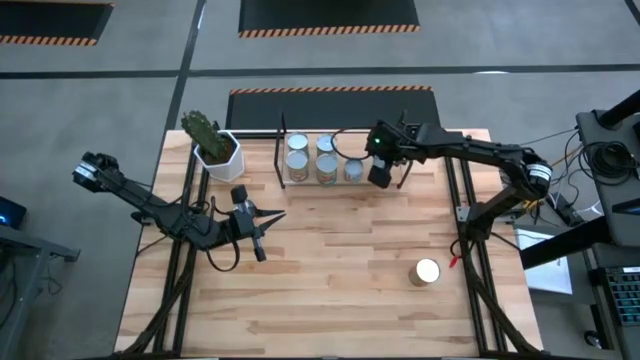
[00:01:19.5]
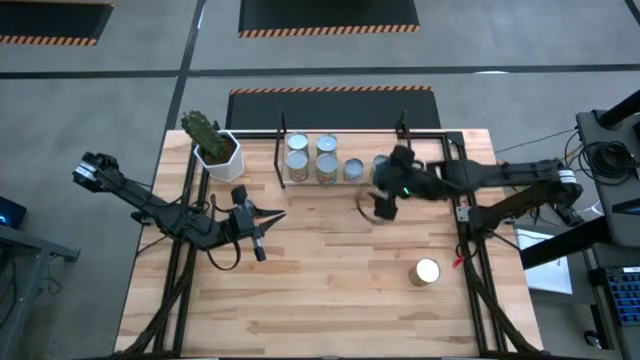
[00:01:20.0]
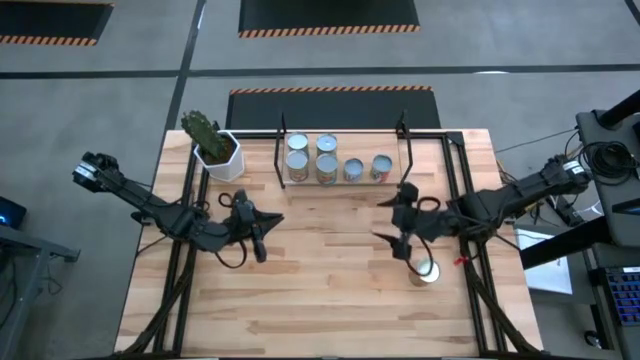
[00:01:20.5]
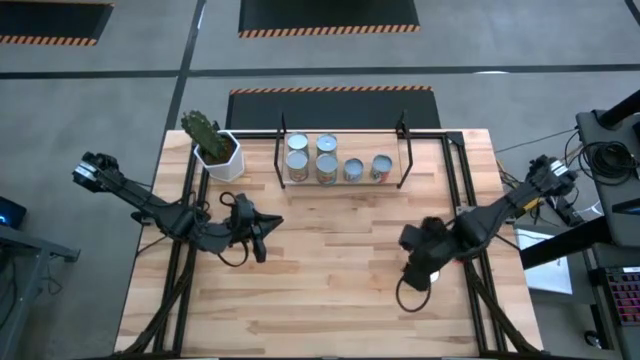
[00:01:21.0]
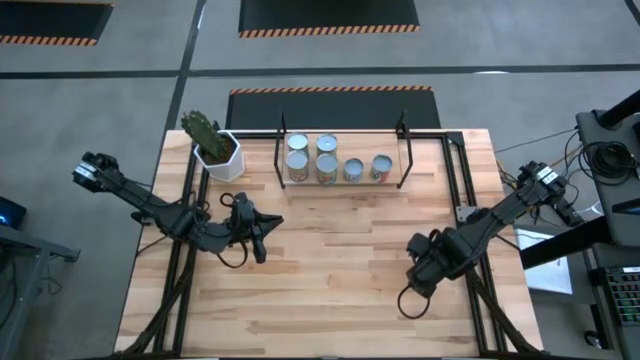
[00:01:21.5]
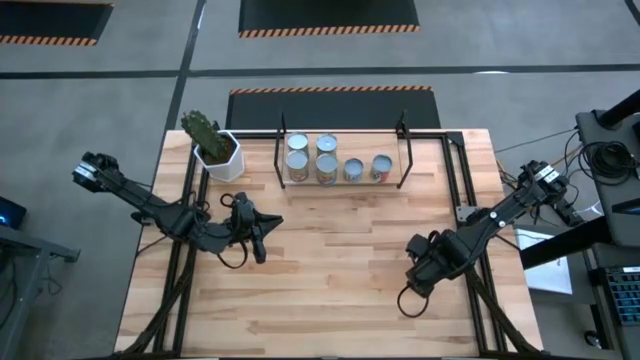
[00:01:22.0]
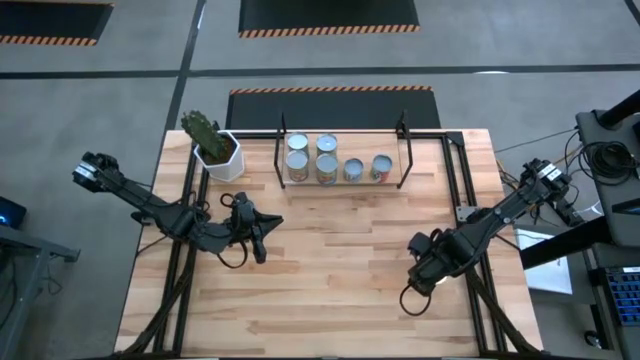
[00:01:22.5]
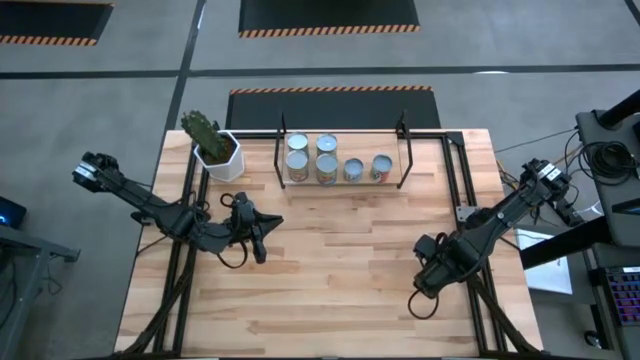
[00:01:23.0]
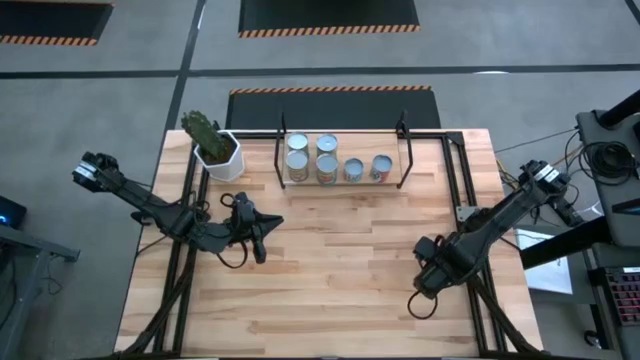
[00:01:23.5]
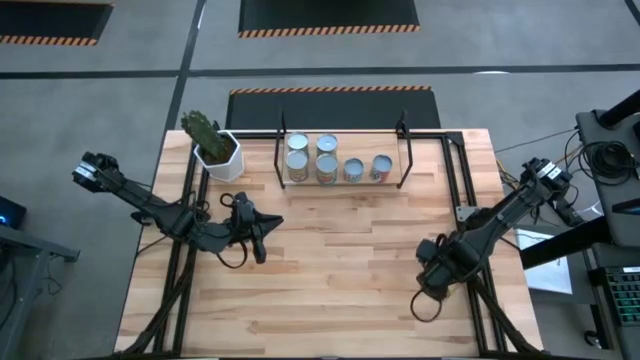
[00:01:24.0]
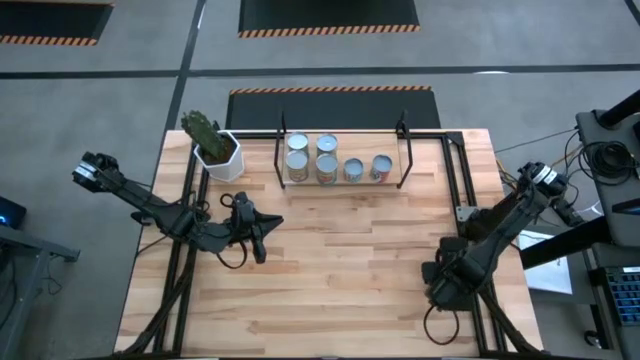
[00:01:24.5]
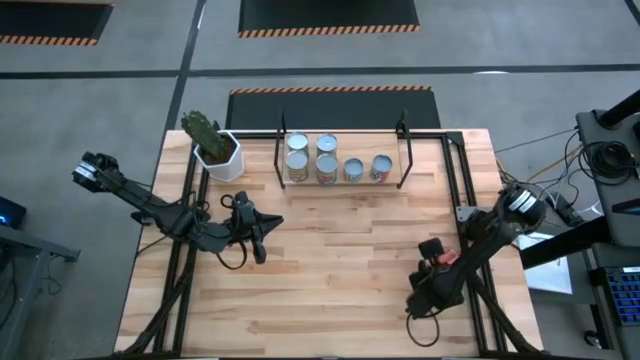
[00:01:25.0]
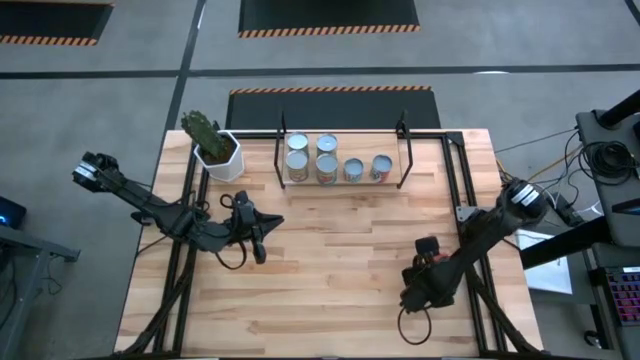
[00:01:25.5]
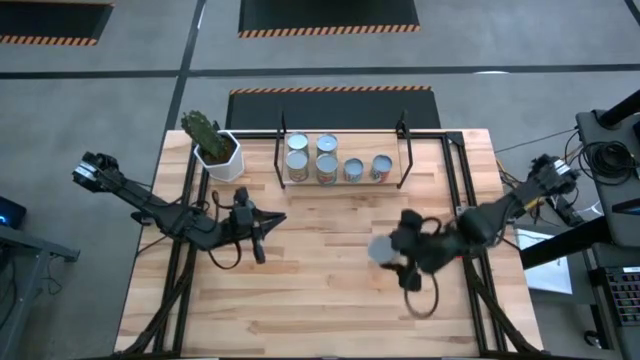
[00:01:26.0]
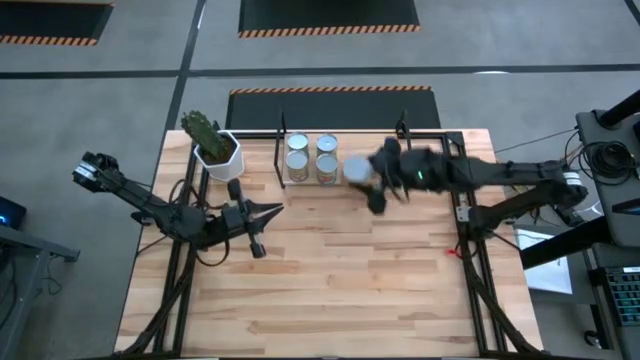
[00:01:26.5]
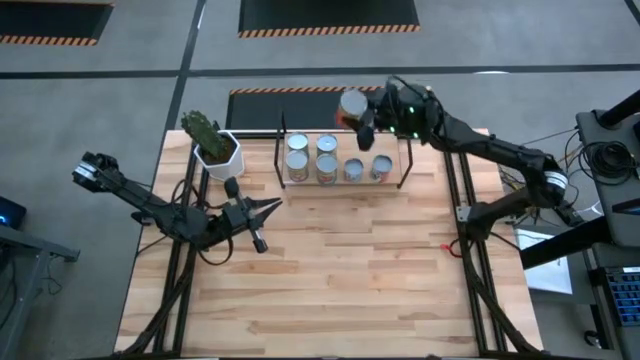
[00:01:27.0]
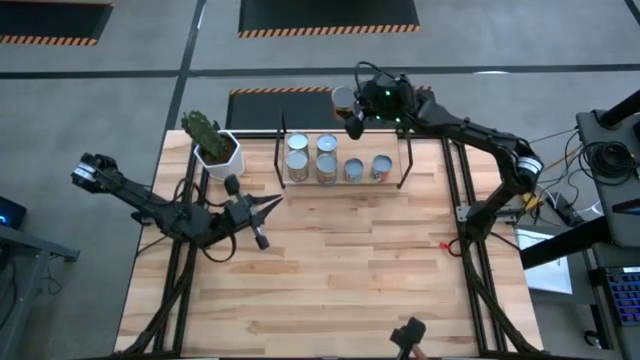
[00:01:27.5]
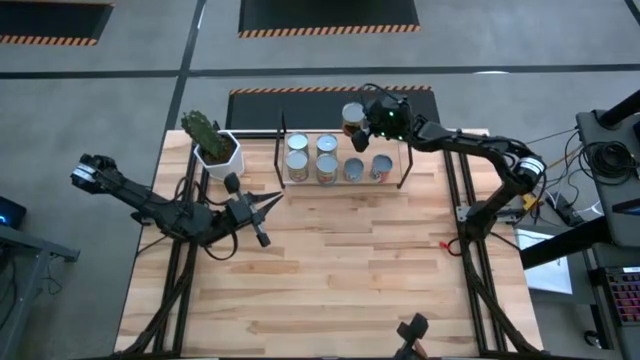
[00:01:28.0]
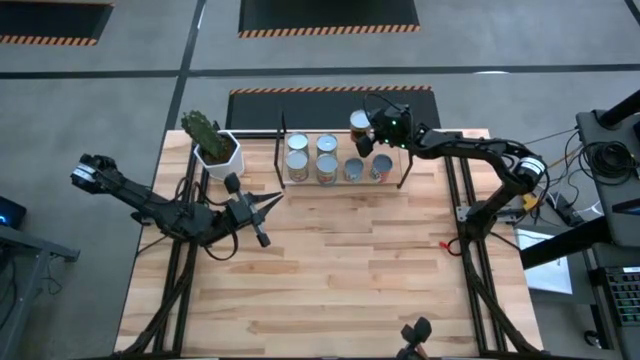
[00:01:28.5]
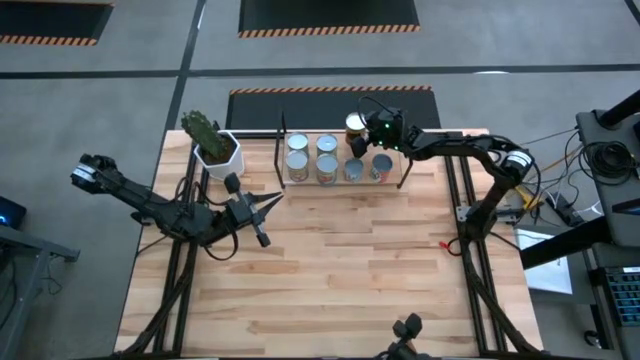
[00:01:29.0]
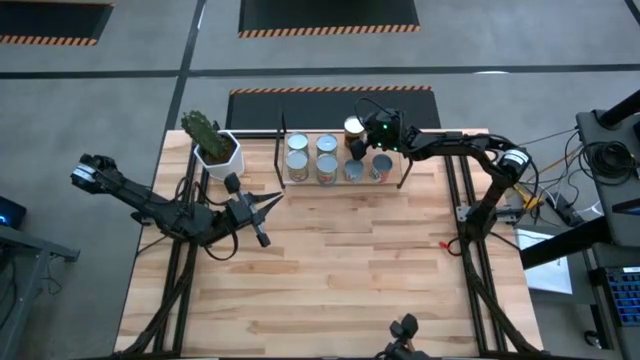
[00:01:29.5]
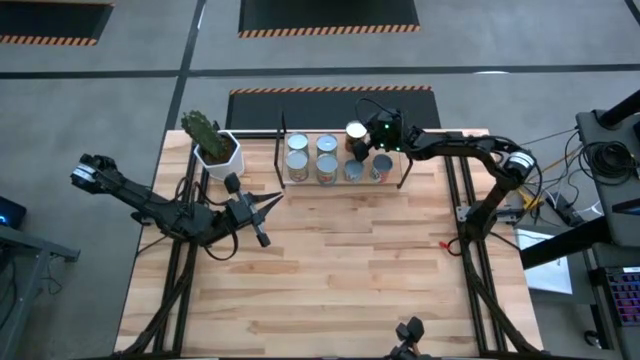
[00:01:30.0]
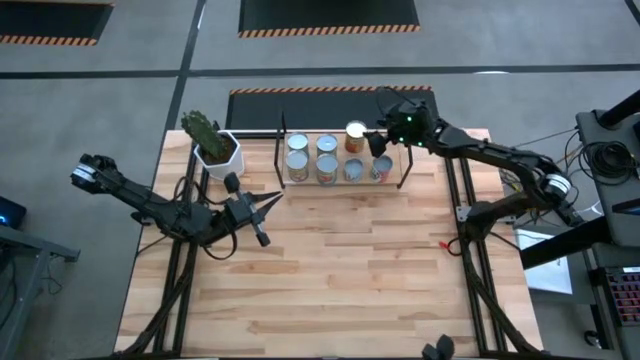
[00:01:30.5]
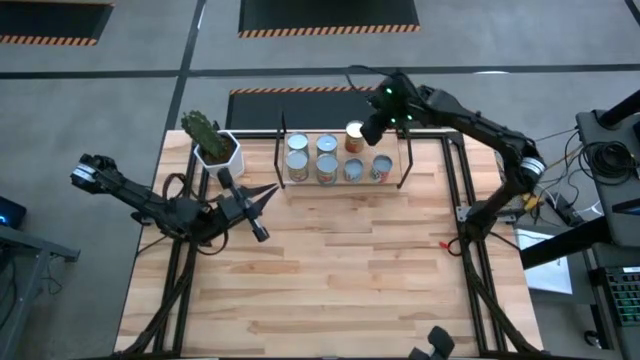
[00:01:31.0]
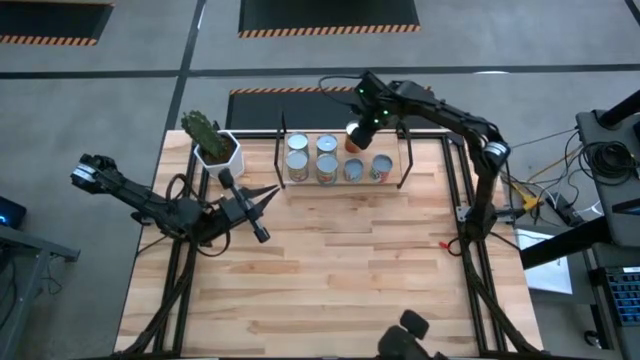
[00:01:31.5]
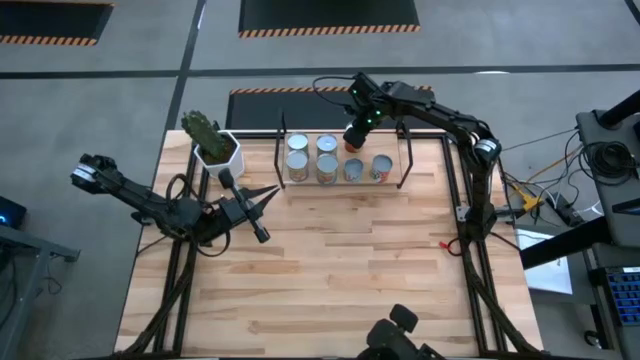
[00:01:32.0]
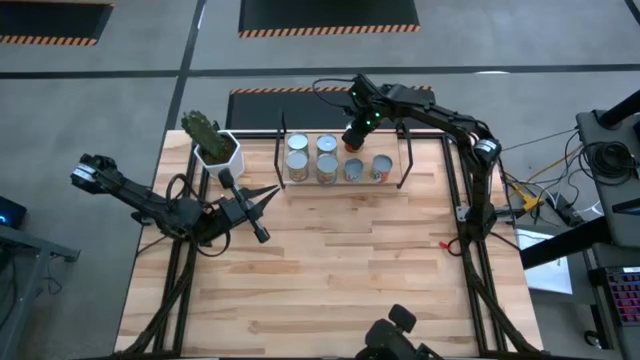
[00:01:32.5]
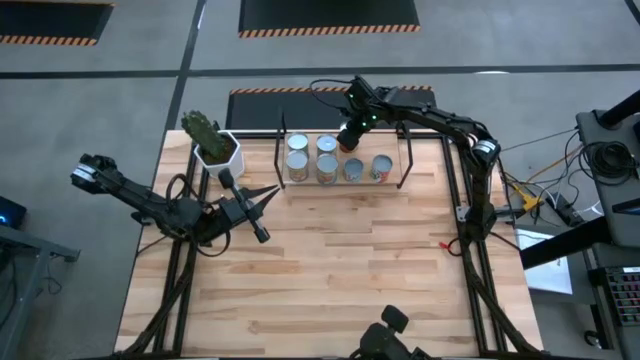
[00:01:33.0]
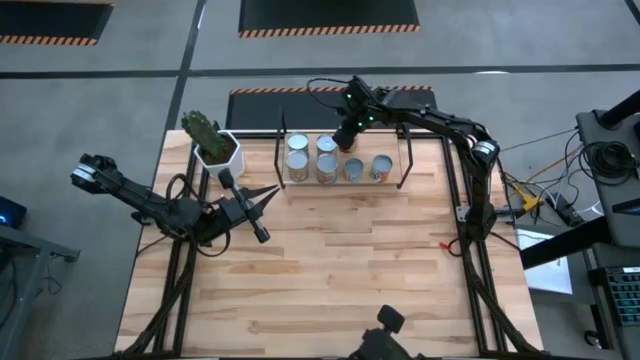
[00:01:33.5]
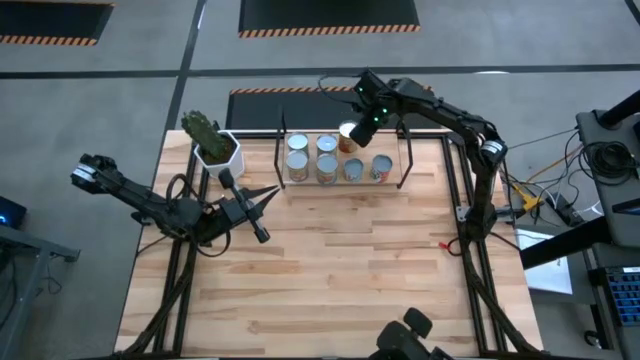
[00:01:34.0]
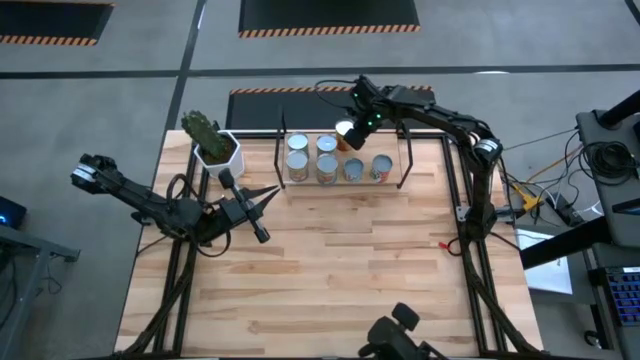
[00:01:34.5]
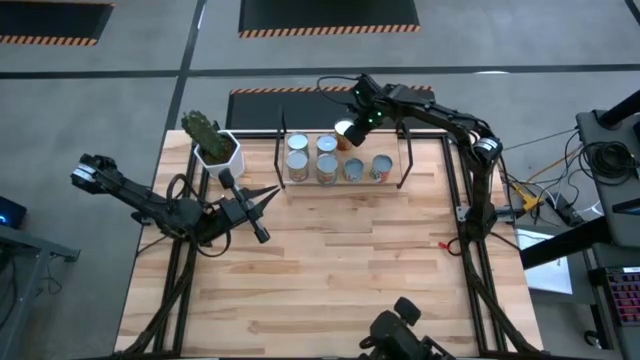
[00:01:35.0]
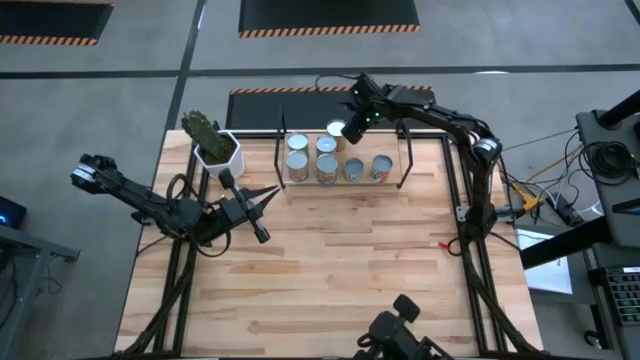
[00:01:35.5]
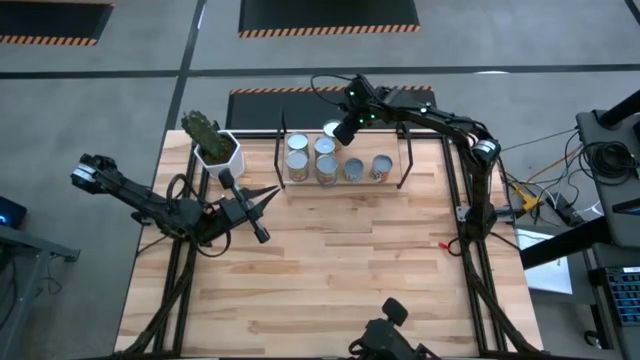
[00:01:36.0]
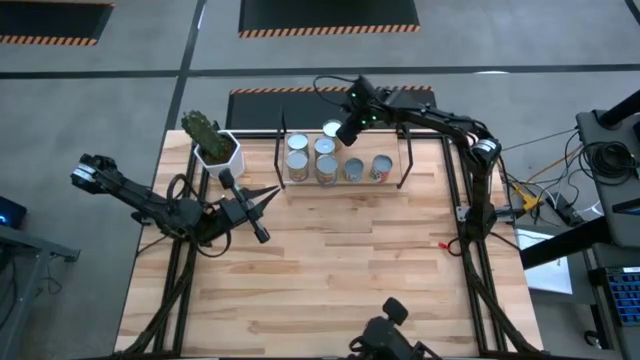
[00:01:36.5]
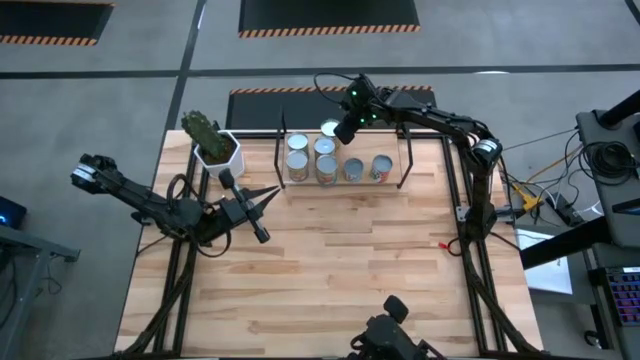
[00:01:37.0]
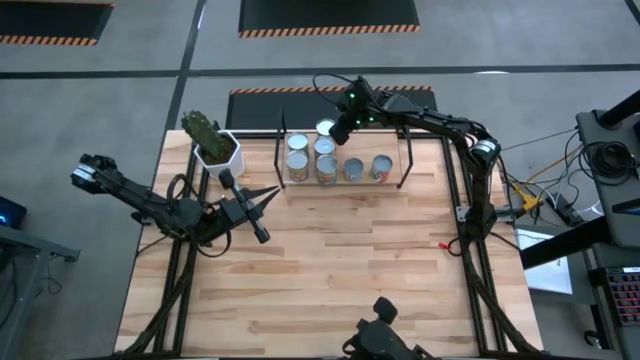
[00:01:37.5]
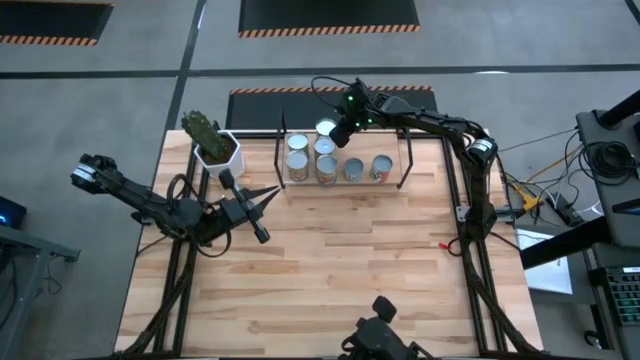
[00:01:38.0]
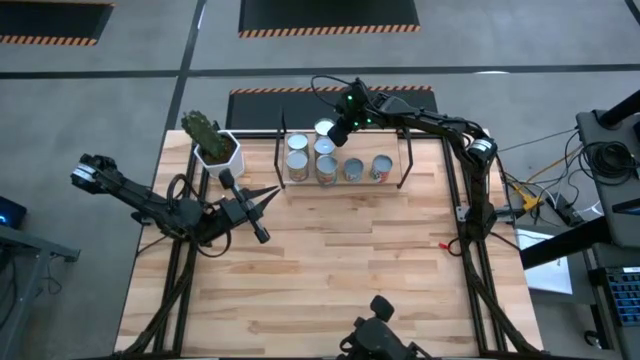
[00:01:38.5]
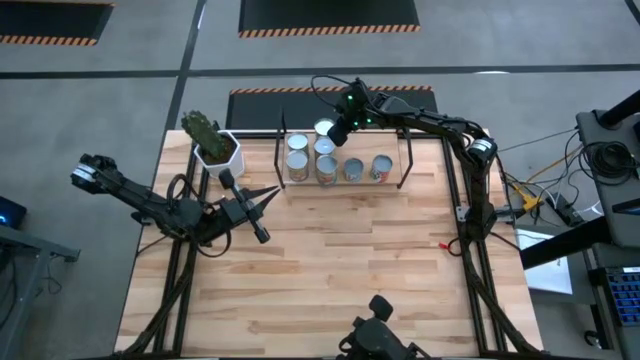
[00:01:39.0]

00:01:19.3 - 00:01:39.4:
Task: Pick and place cans onto a shelf
Put the canned pineapple on the shelf

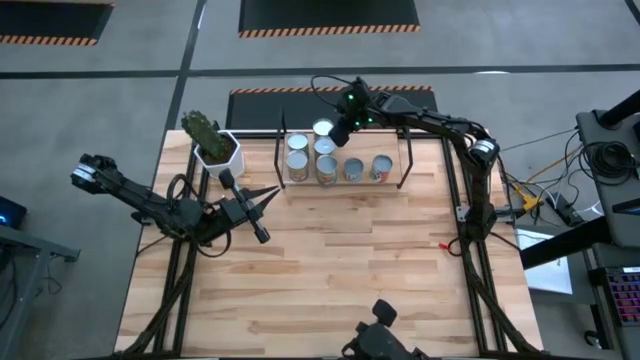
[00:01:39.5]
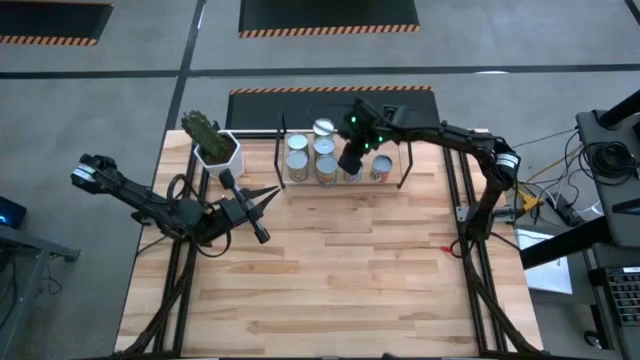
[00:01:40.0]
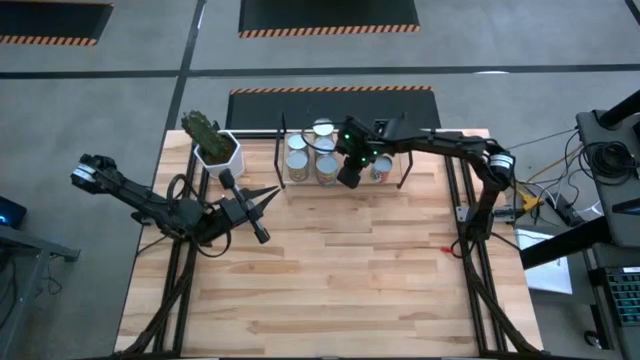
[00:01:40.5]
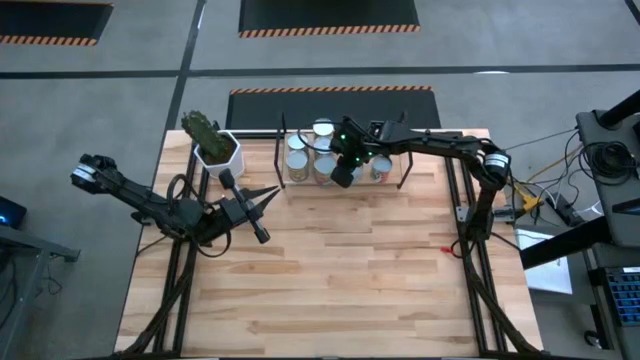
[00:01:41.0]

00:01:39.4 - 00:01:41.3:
Adjust the canned tomatoes on the shelf
